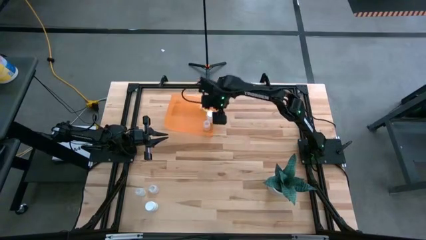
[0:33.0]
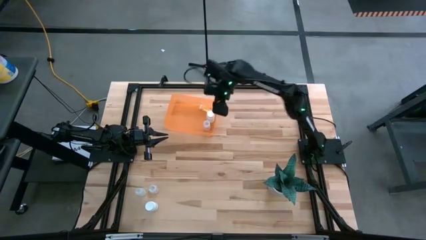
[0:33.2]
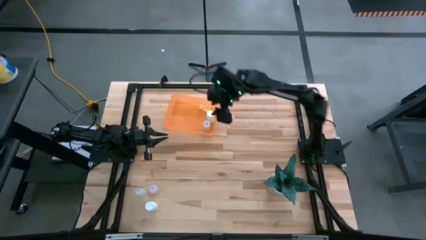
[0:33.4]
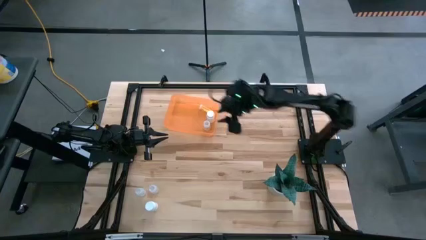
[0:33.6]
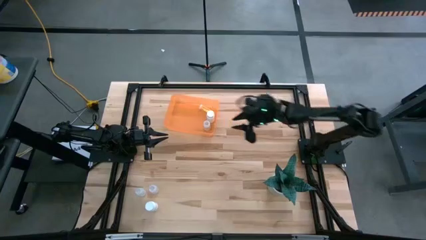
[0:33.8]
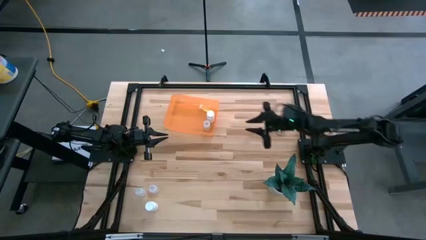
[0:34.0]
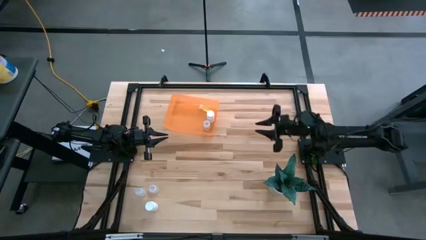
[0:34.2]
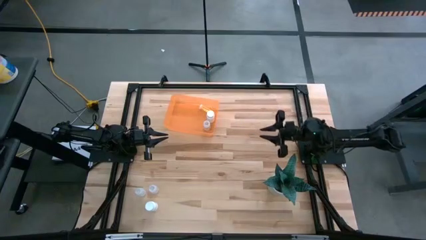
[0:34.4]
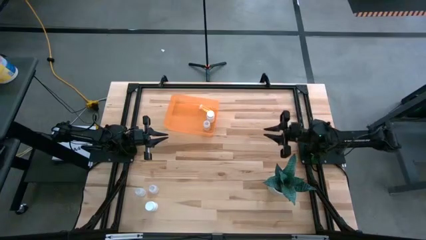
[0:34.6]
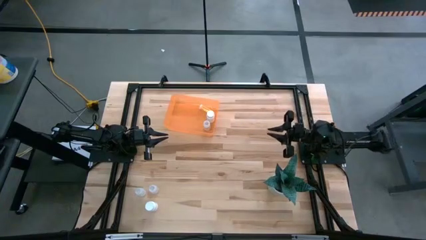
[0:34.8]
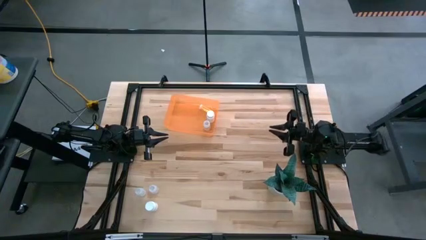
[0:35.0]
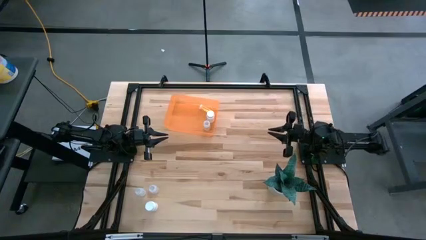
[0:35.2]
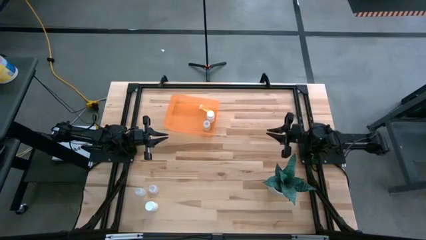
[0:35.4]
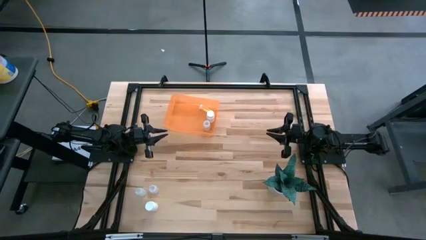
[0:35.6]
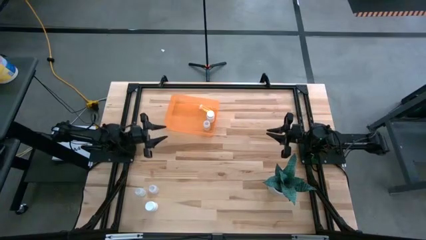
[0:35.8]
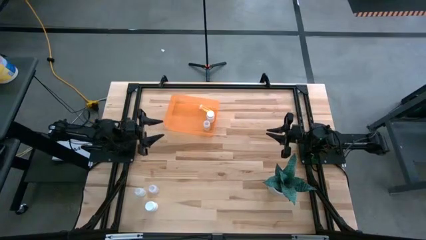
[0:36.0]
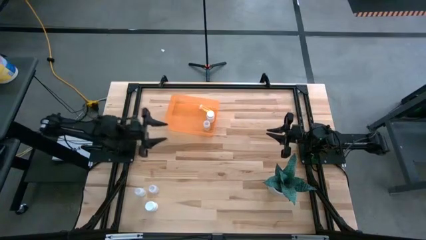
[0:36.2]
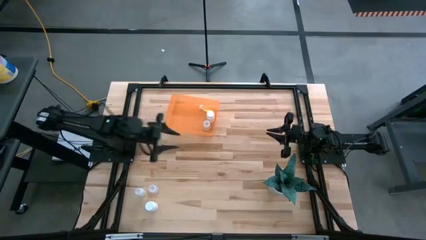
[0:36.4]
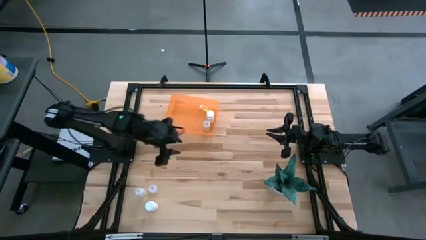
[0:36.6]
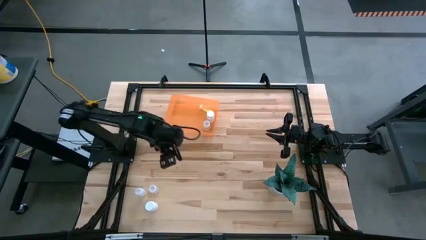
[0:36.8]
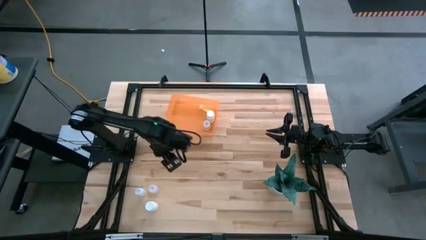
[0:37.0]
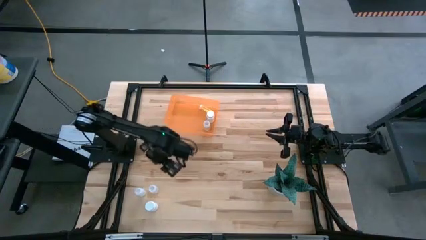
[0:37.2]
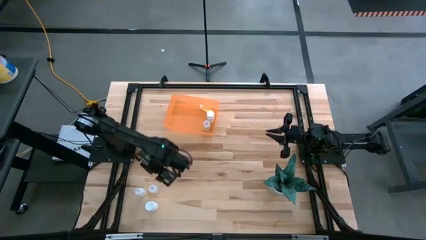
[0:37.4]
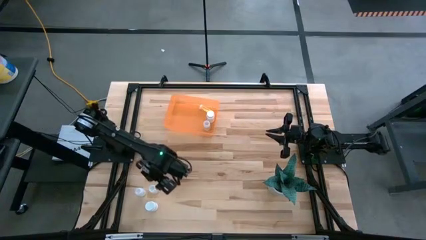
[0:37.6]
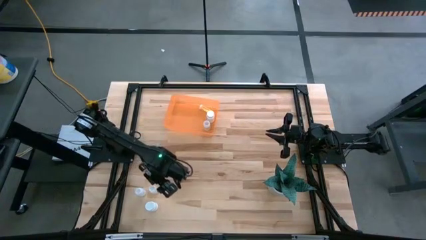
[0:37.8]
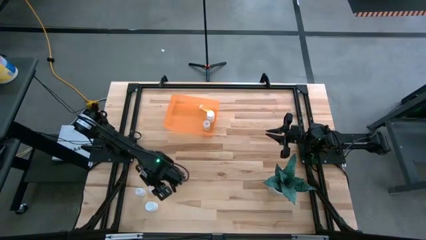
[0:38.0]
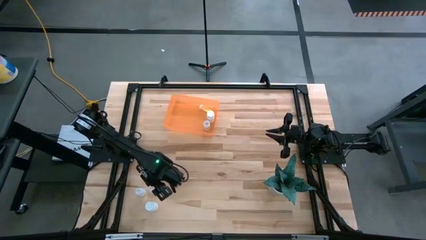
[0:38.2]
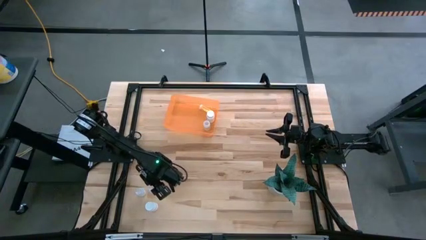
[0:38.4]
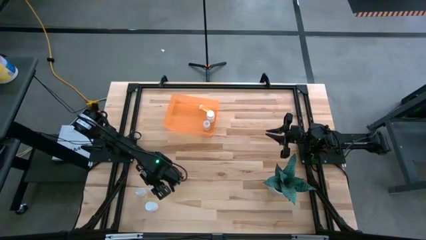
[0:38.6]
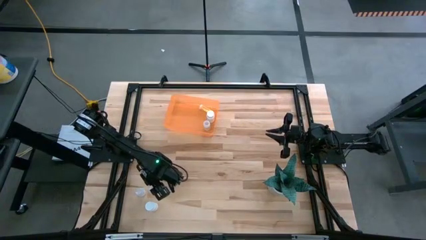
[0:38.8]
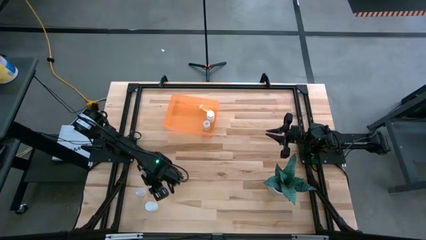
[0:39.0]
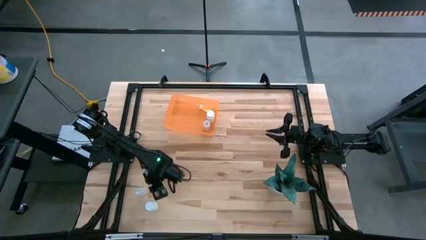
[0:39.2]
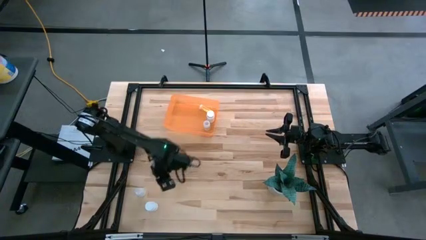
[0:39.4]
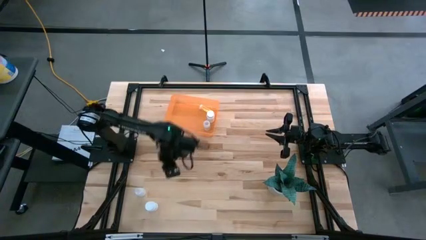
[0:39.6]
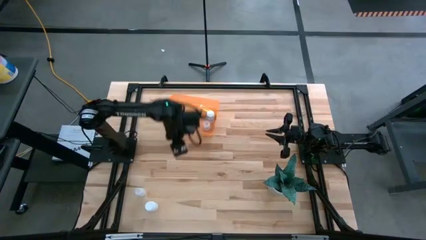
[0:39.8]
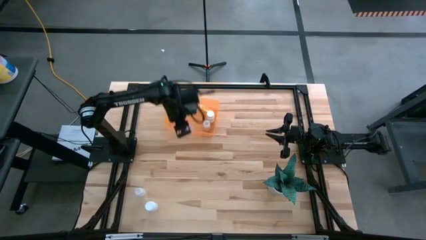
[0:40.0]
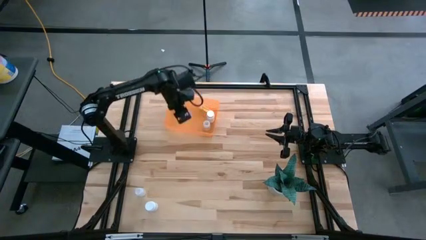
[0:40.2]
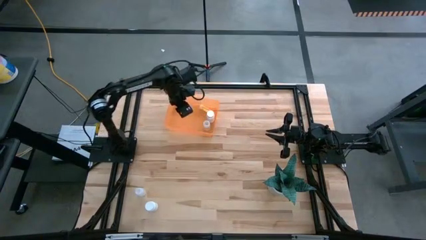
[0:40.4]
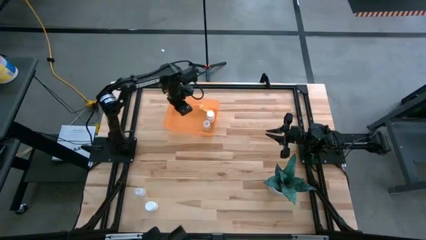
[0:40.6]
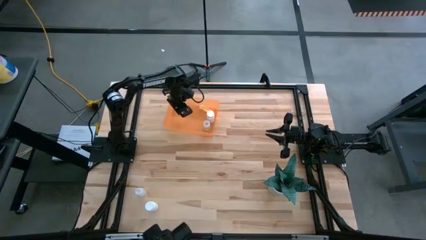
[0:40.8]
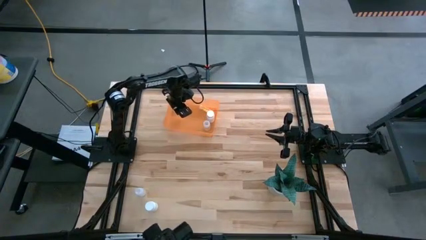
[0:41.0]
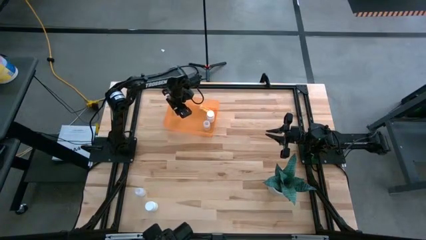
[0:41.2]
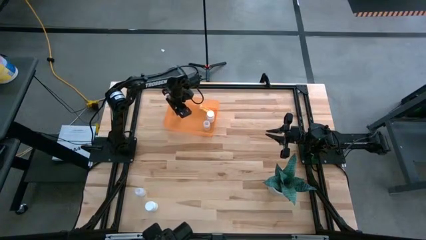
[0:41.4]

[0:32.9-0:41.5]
Task: Pick and place pill bottles into a basket
Put the transparent pill bottle into the orange bin

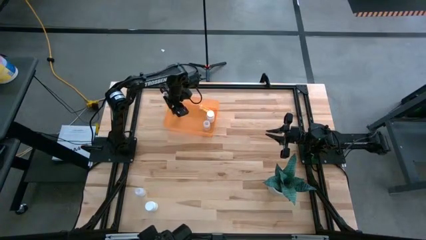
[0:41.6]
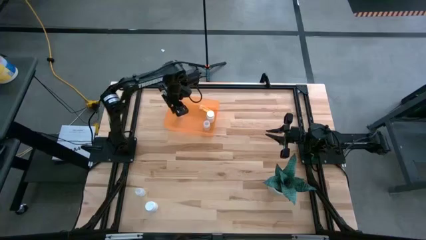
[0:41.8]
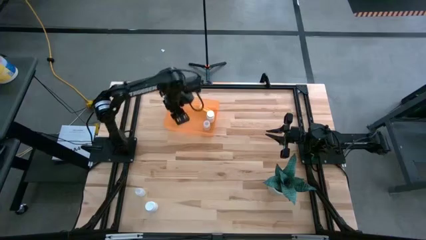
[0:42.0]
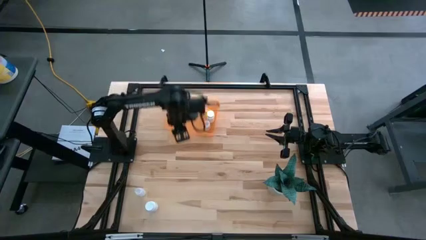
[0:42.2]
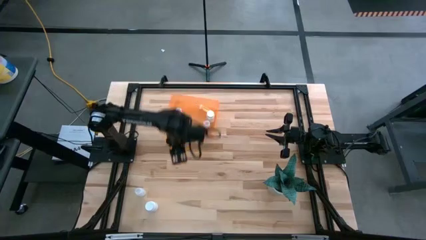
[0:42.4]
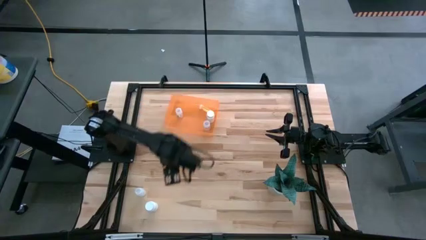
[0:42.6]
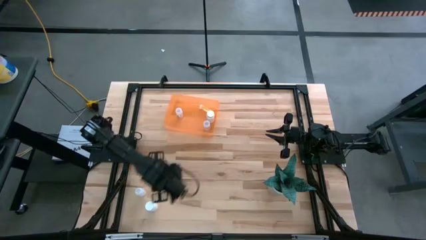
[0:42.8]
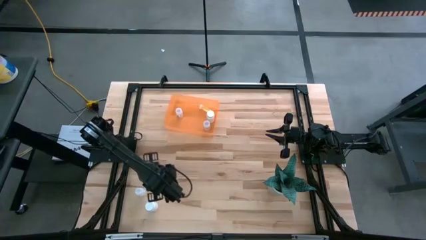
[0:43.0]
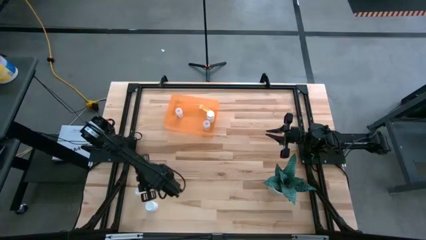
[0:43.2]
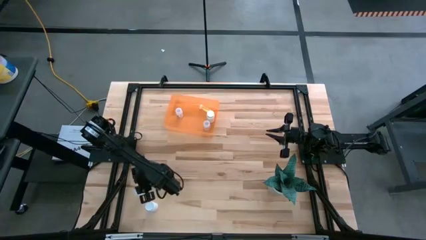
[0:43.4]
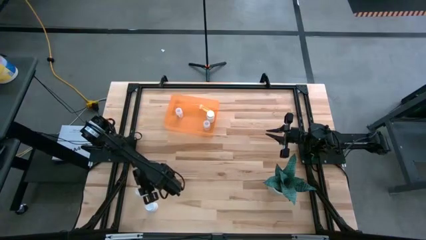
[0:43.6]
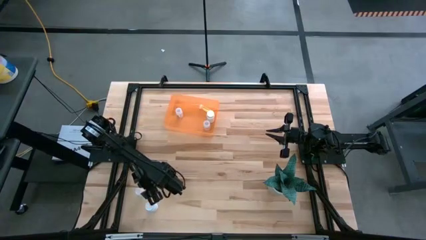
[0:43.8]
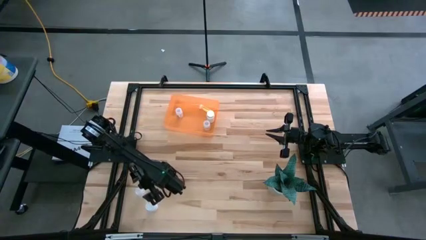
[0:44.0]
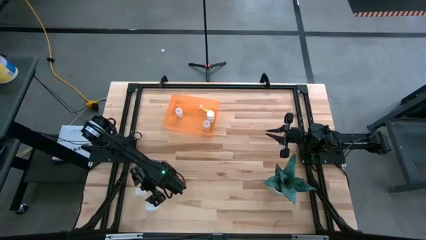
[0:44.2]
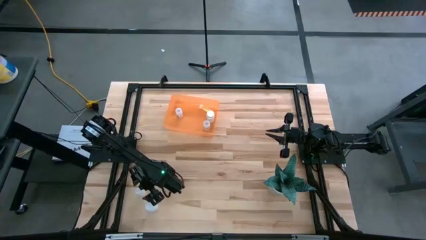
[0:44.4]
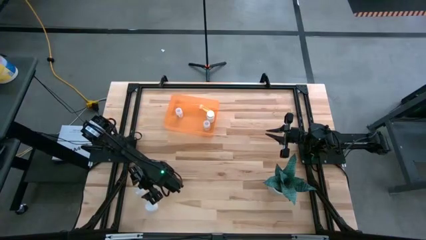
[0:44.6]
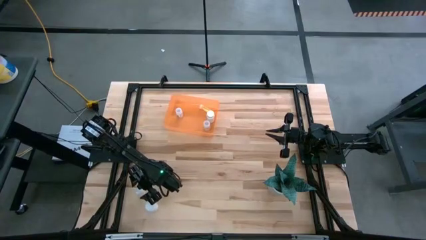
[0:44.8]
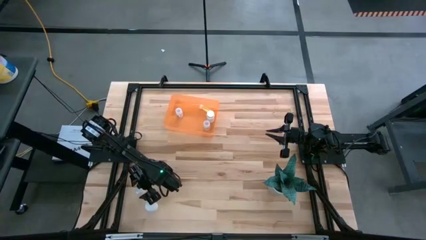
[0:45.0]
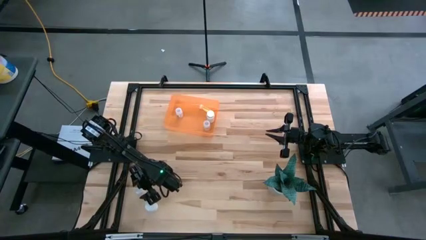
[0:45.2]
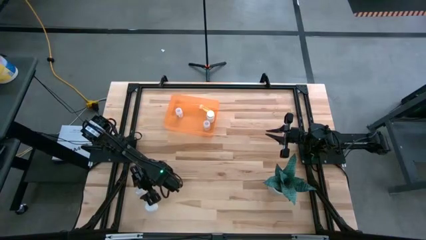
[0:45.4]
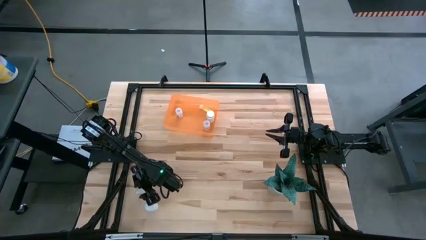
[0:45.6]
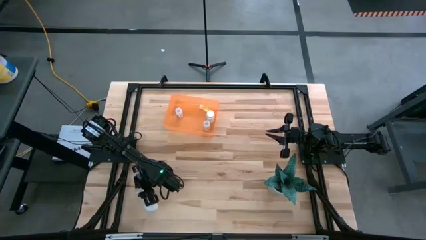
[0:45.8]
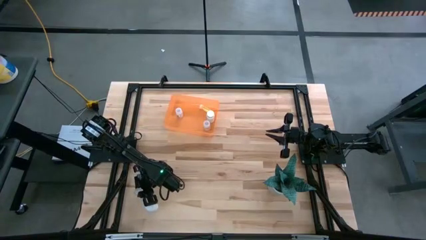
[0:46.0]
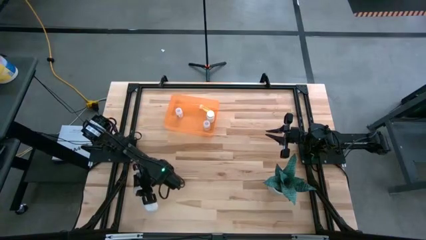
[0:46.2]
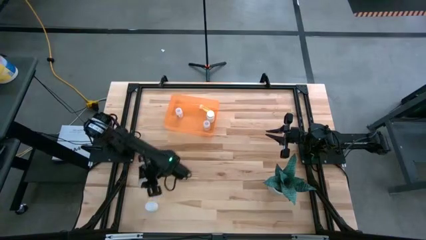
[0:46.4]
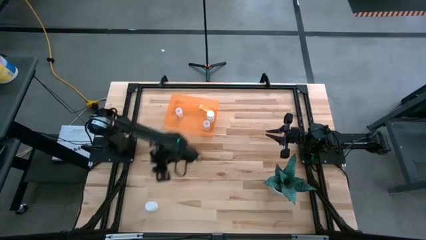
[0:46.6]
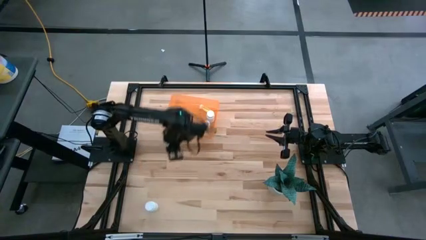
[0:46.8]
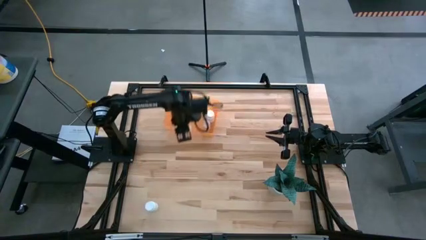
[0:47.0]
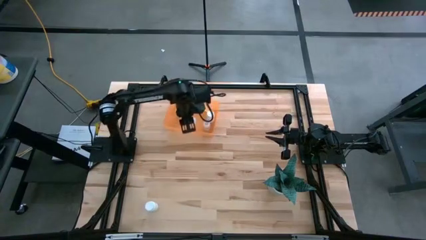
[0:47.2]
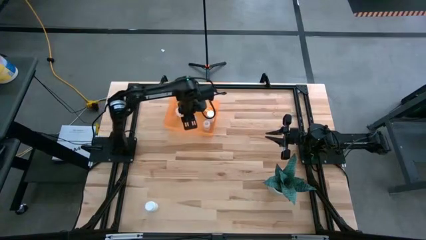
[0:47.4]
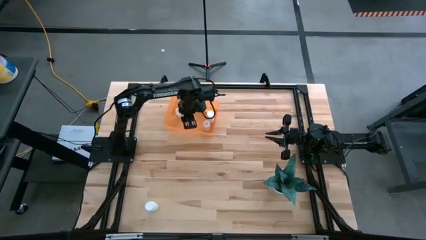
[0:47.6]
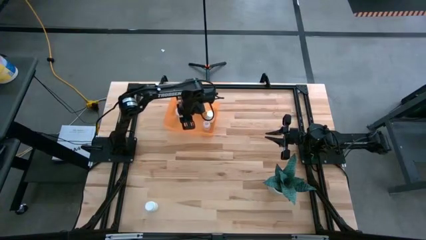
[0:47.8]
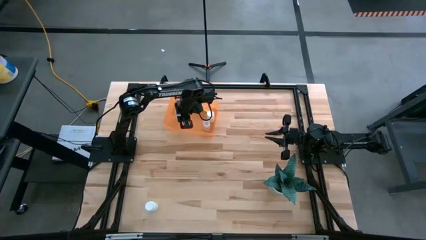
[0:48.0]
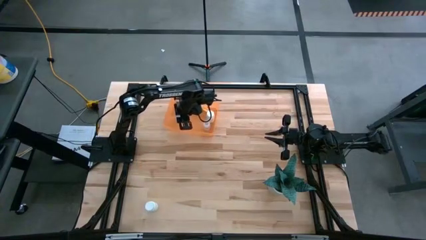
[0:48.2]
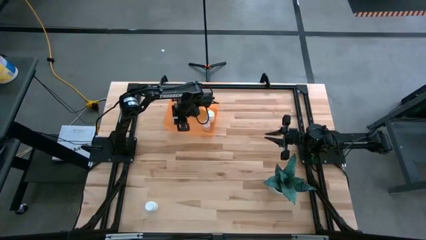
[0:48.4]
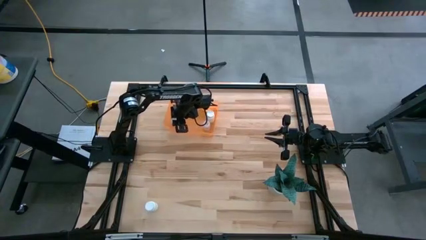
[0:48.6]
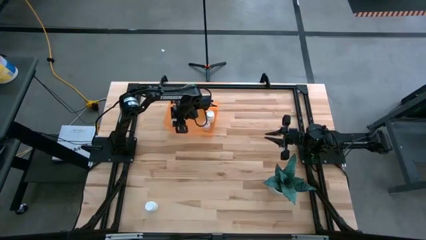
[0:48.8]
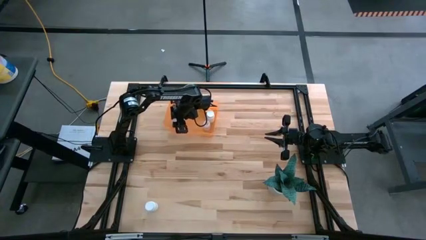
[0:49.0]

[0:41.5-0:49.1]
Put the left white pill bottle into the orange bin

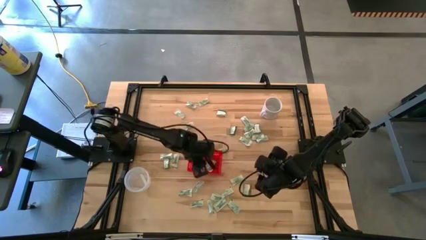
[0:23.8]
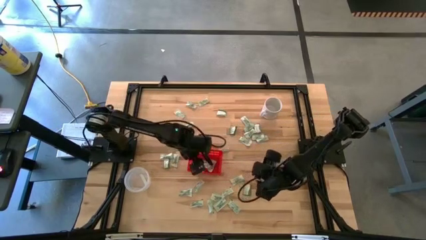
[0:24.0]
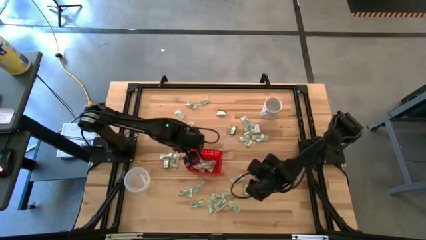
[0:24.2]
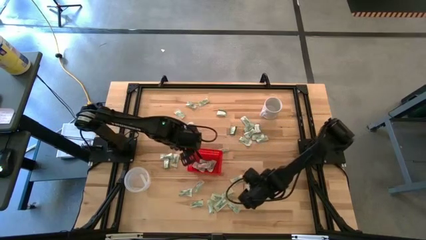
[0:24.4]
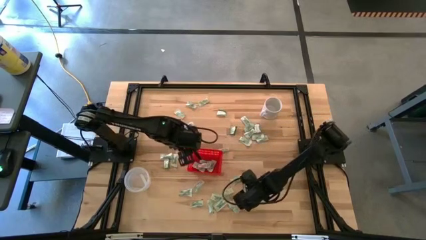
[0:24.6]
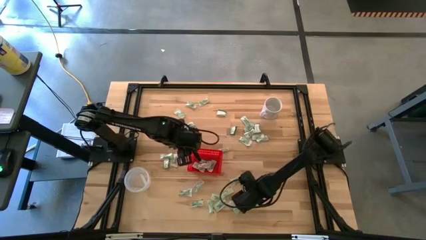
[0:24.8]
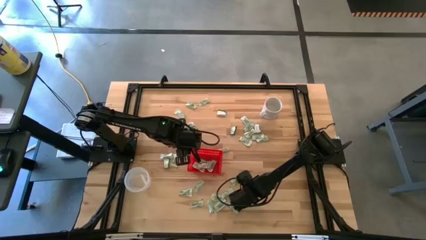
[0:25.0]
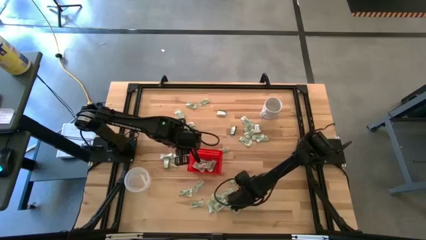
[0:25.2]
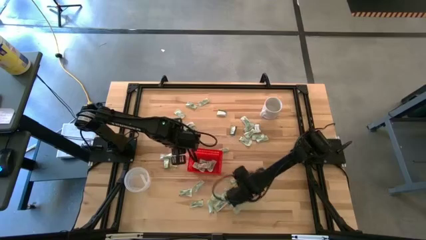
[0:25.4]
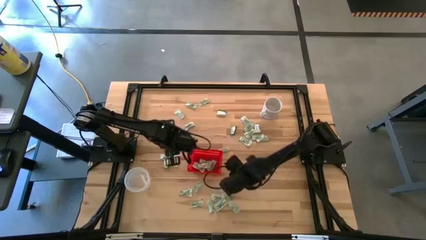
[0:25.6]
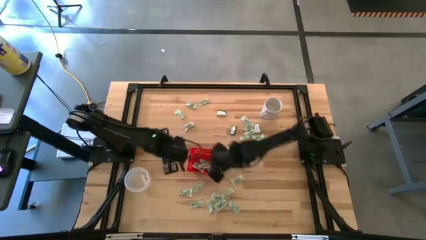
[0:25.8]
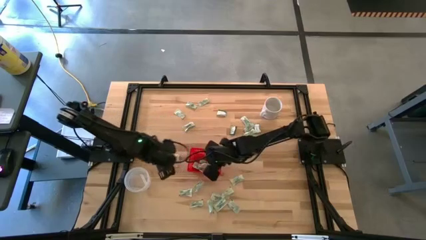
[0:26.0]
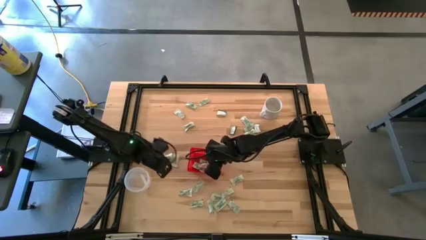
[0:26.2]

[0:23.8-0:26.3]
Task: Pick and place Stevia / Truvia into bins
Put the dark green truvia packet into the red basket
